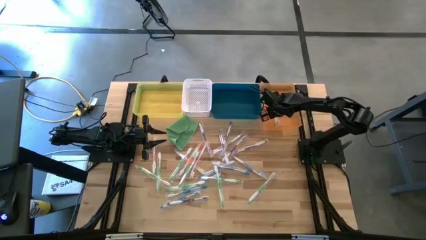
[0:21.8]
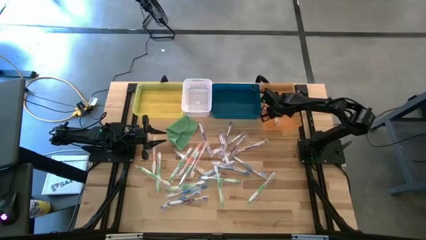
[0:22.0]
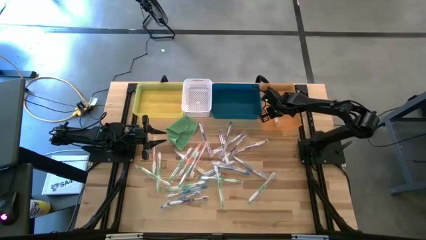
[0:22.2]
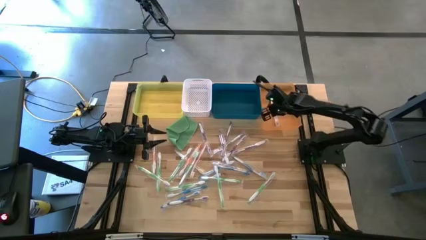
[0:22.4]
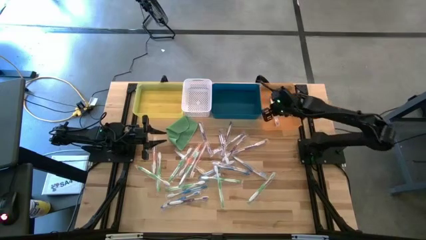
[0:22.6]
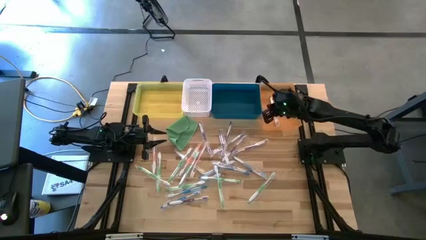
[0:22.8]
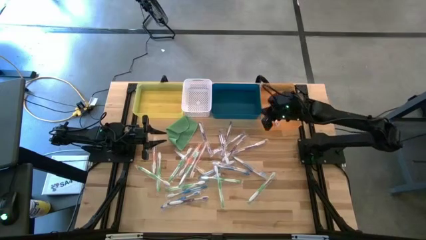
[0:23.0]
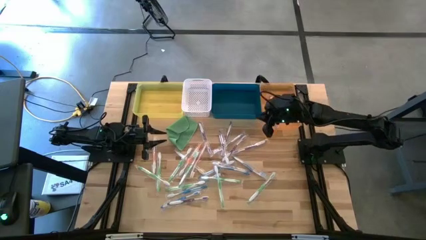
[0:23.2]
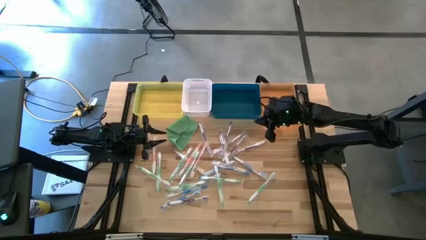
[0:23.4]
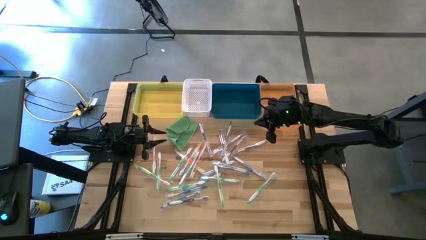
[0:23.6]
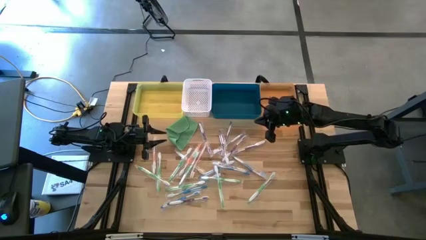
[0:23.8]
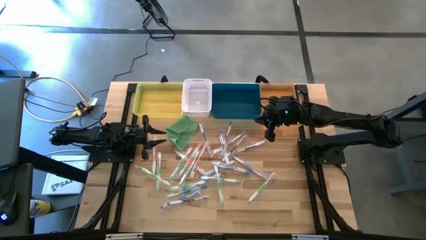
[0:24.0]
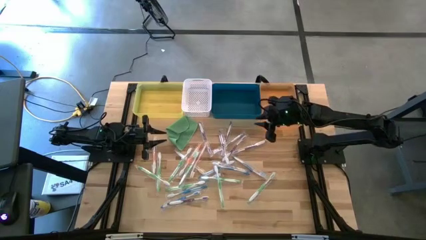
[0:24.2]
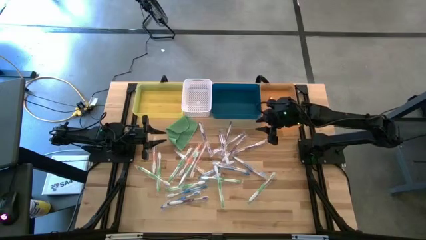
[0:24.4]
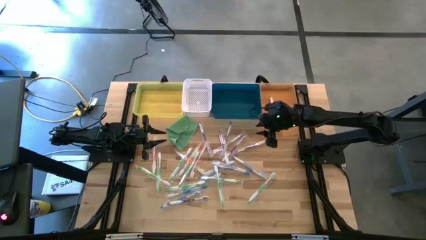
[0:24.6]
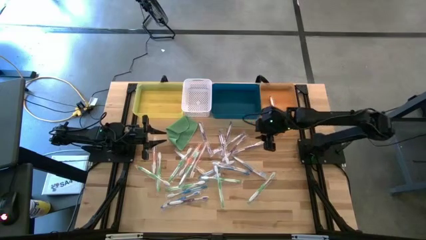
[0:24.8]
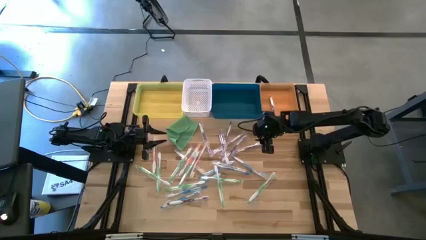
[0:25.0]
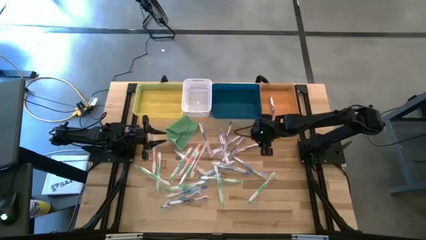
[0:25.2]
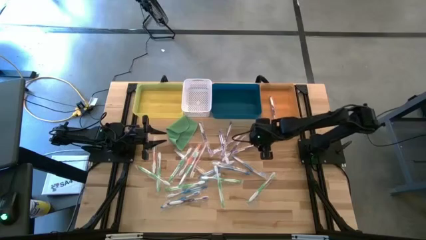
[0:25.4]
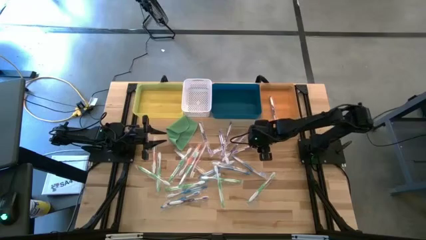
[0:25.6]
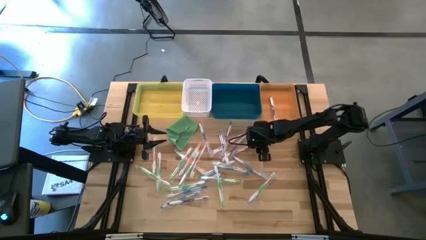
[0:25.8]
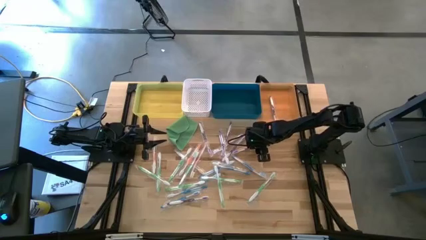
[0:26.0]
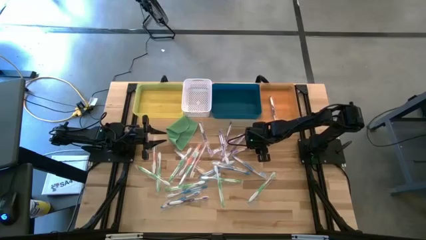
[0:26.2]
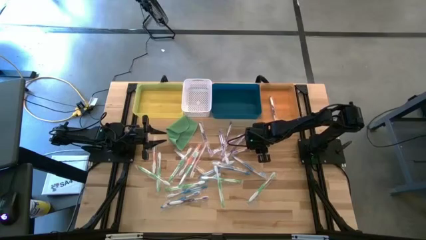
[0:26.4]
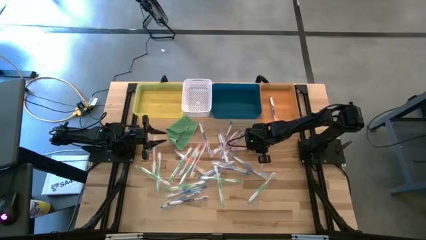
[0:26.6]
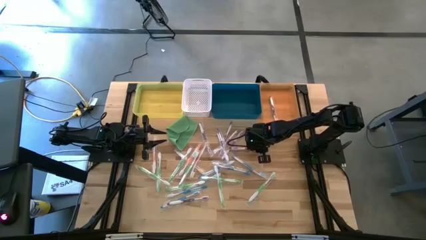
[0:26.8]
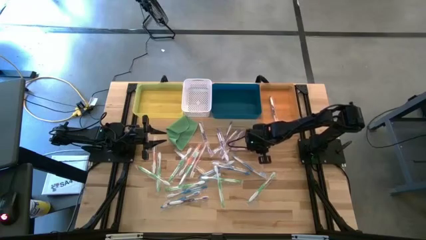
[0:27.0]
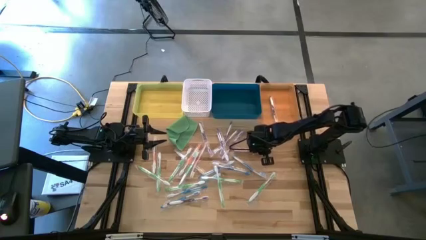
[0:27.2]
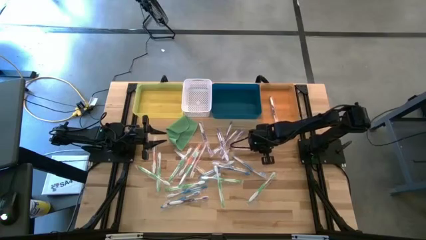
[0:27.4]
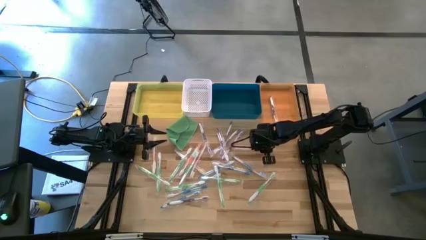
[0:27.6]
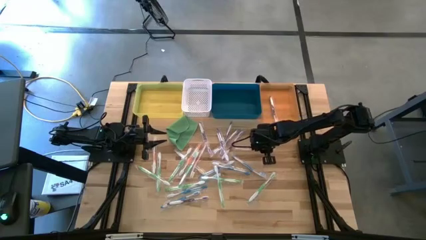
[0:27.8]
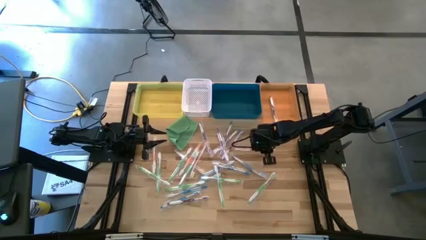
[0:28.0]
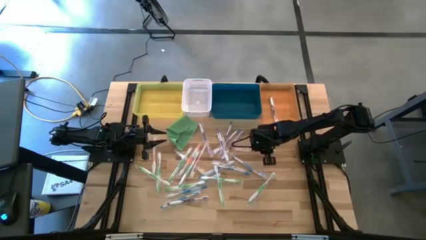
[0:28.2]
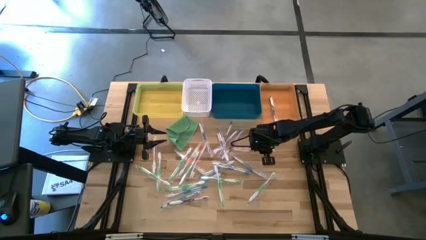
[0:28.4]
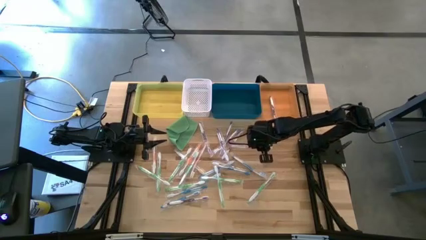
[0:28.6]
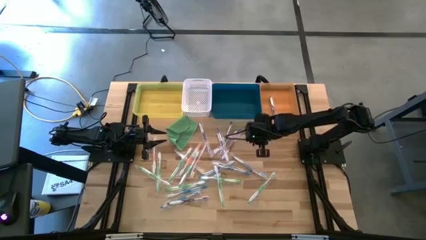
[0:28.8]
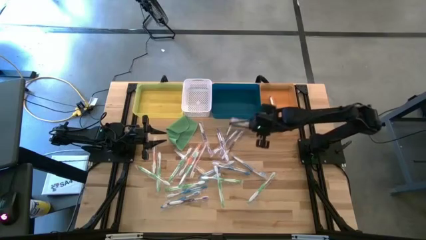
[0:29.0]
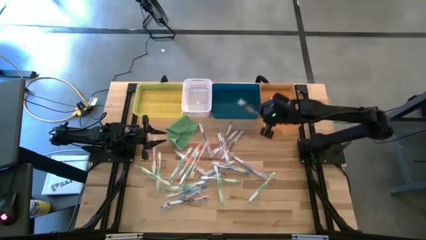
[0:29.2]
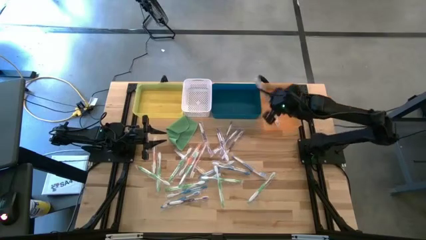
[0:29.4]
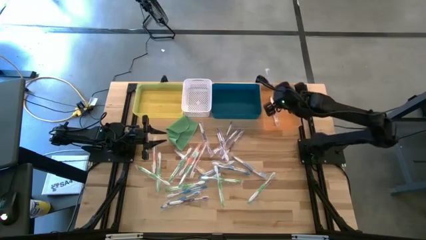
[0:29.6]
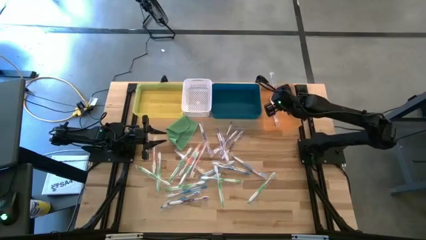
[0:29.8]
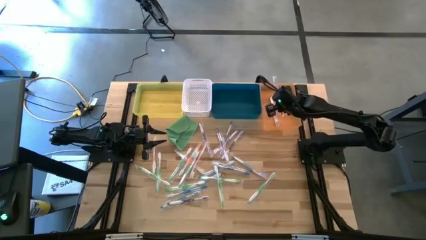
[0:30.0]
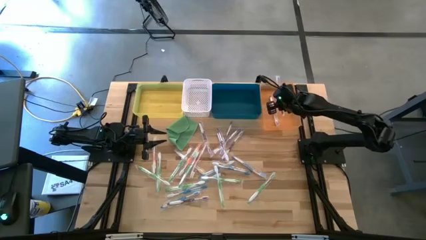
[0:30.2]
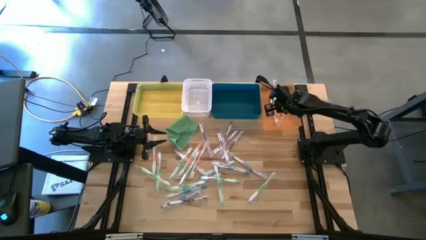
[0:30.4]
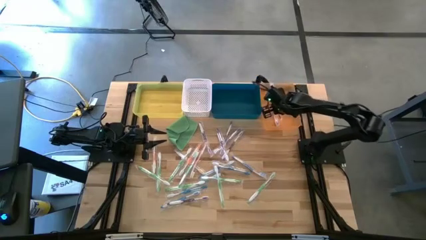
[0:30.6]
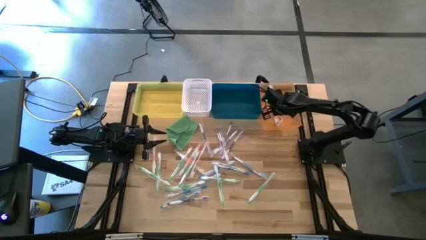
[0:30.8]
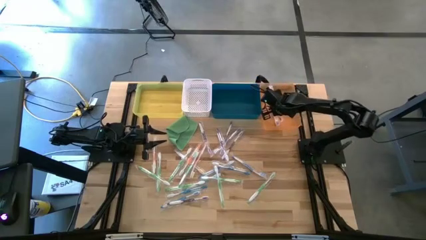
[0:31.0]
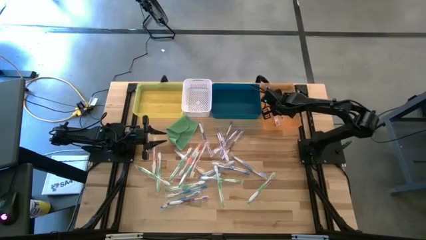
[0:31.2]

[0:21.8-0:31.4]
Task: Pick & Place Toothbrushes
Put the violet toothbrush into the orange bin
